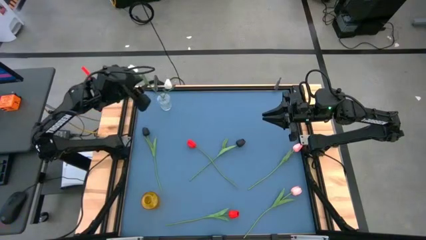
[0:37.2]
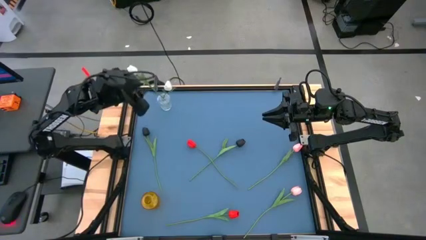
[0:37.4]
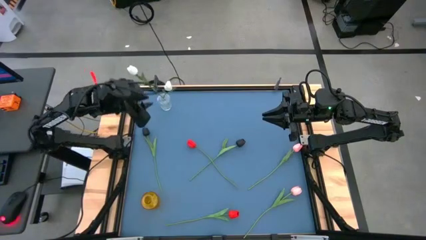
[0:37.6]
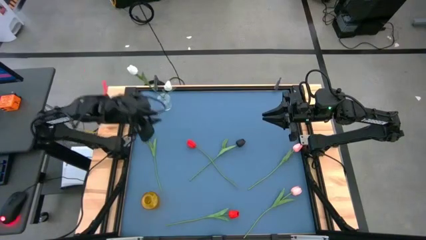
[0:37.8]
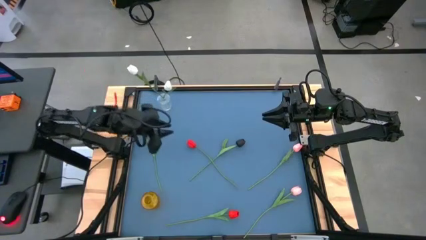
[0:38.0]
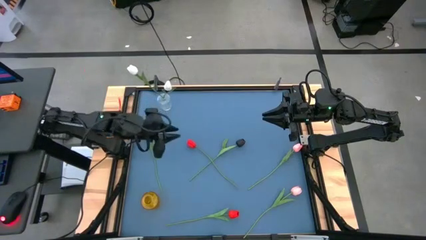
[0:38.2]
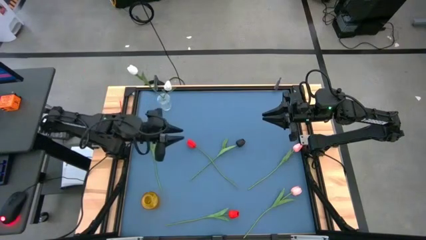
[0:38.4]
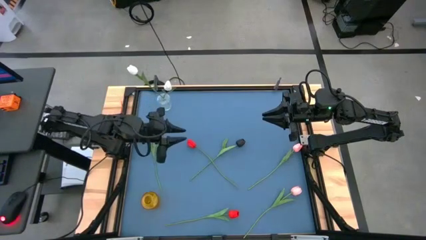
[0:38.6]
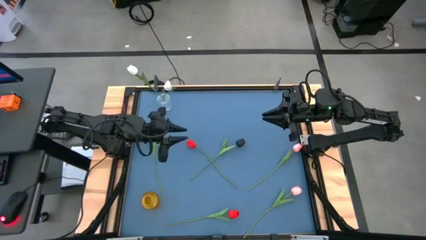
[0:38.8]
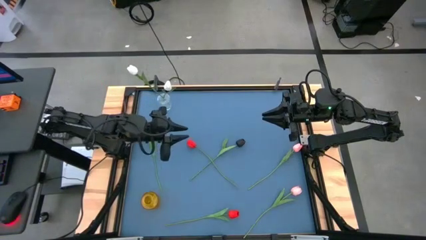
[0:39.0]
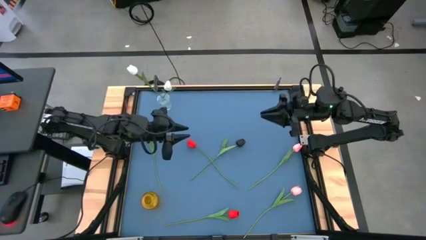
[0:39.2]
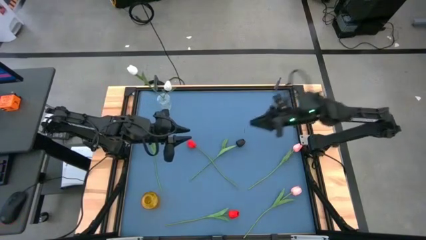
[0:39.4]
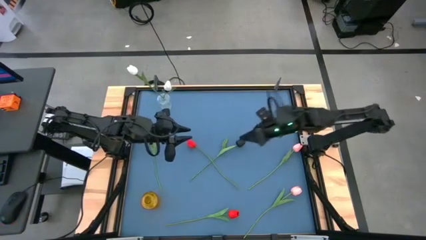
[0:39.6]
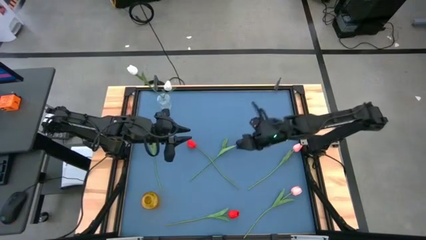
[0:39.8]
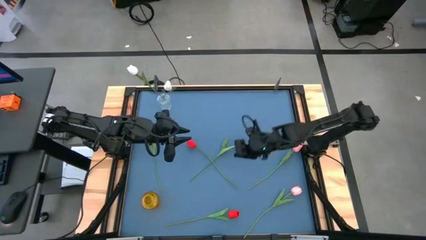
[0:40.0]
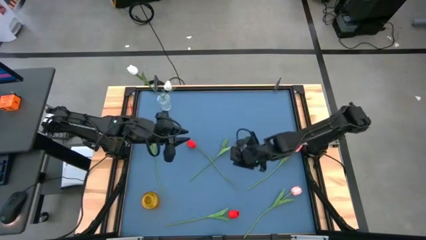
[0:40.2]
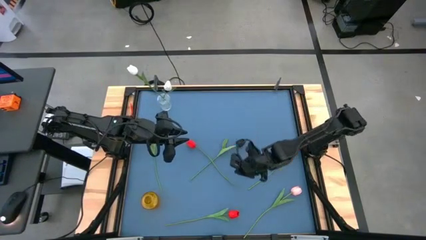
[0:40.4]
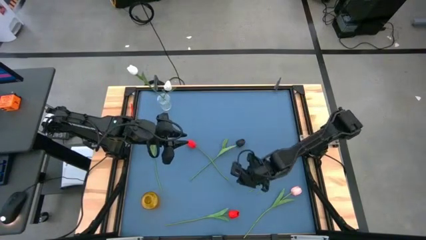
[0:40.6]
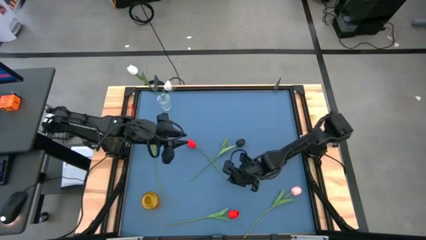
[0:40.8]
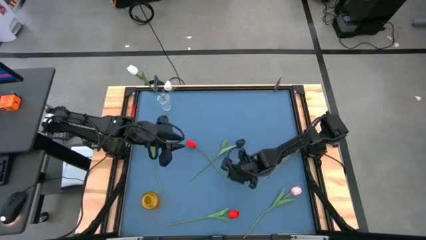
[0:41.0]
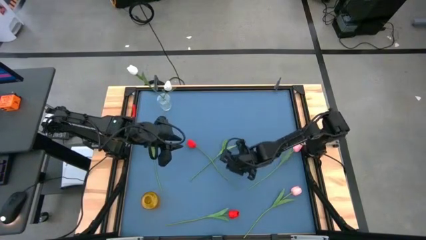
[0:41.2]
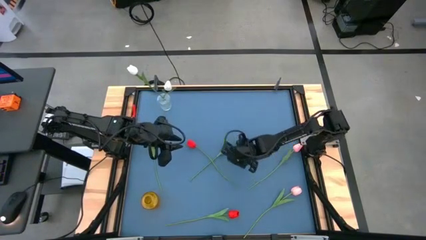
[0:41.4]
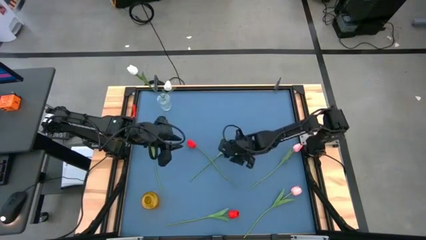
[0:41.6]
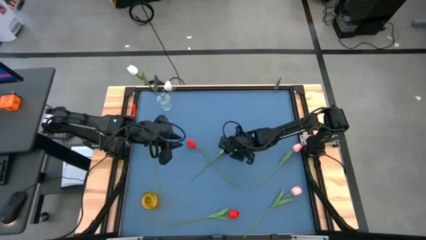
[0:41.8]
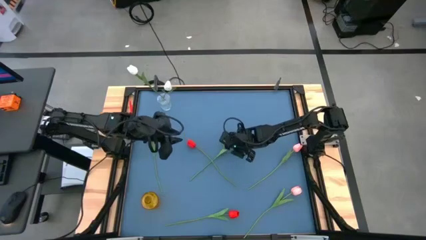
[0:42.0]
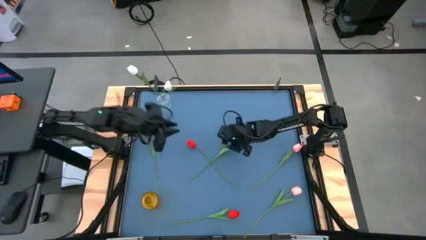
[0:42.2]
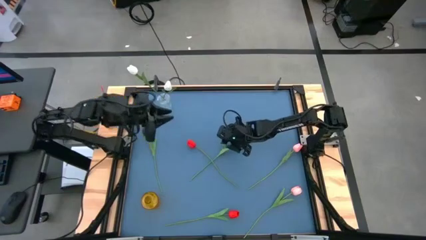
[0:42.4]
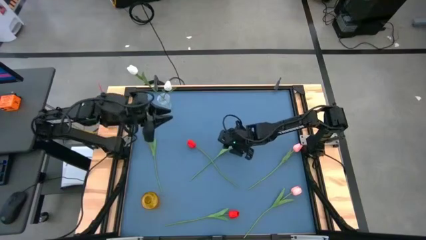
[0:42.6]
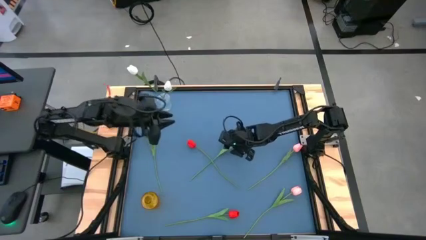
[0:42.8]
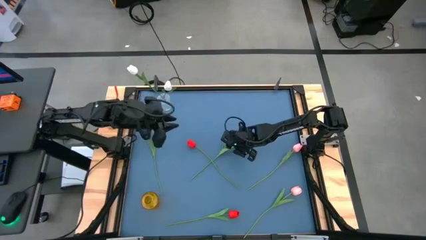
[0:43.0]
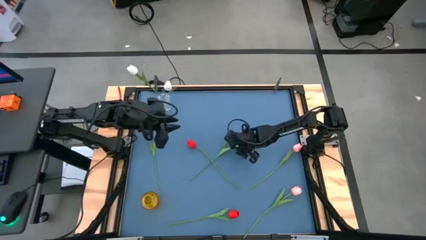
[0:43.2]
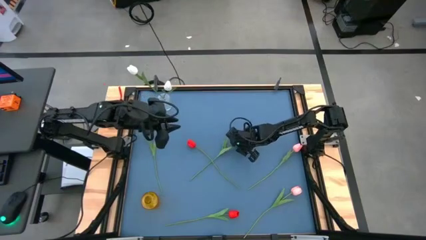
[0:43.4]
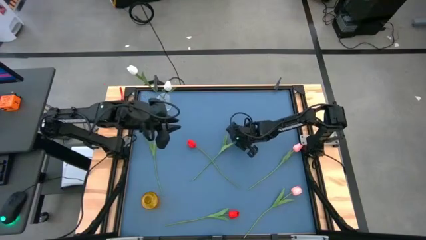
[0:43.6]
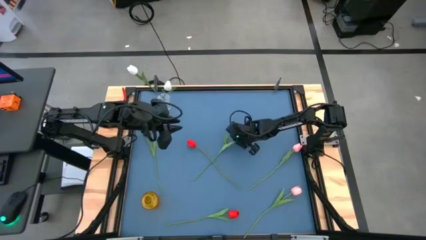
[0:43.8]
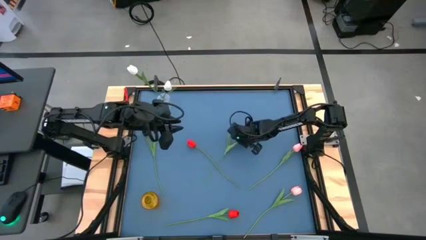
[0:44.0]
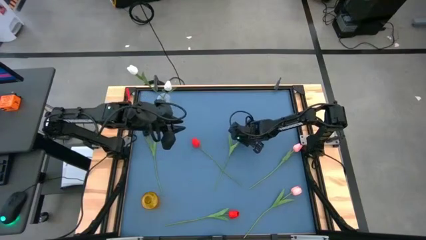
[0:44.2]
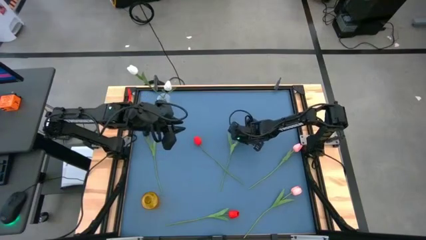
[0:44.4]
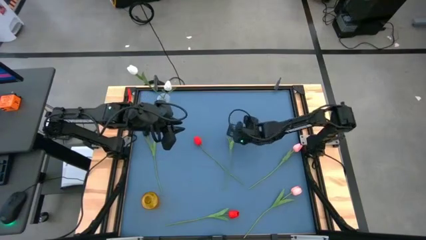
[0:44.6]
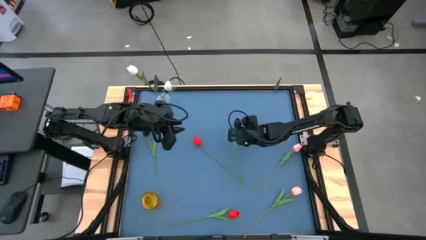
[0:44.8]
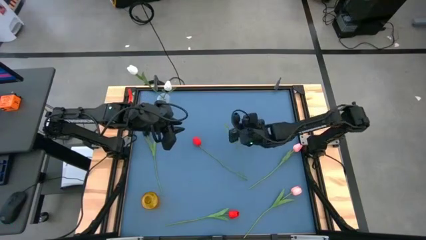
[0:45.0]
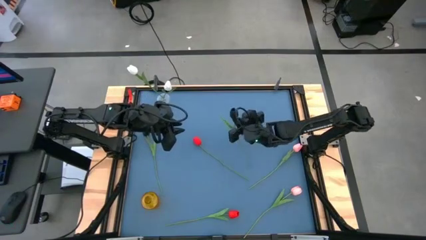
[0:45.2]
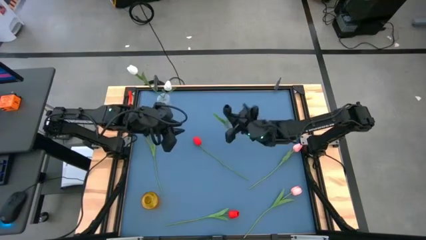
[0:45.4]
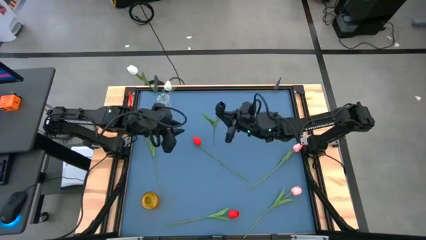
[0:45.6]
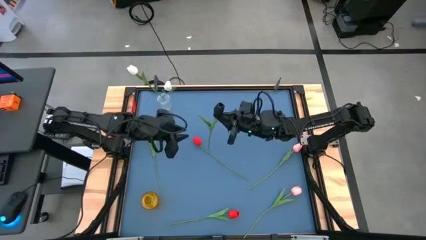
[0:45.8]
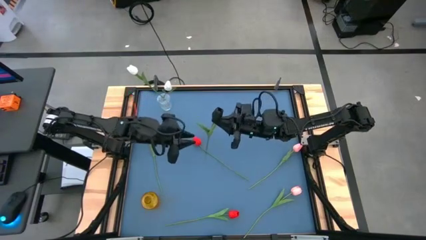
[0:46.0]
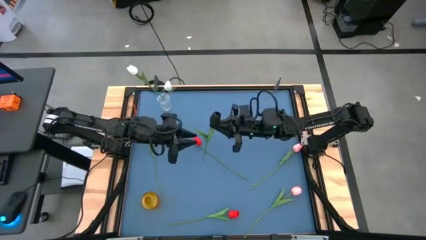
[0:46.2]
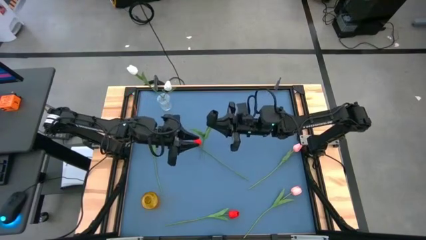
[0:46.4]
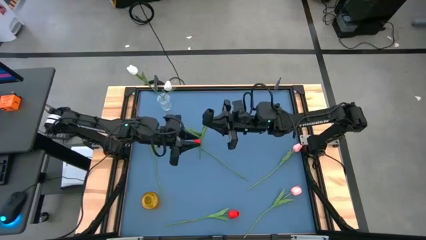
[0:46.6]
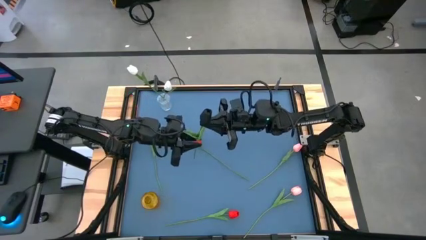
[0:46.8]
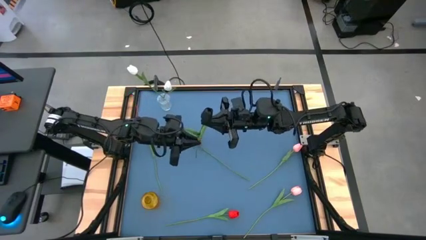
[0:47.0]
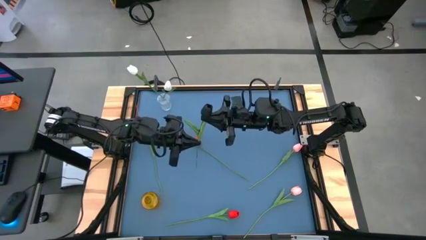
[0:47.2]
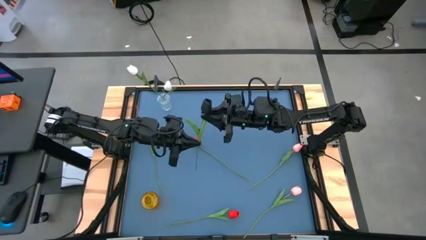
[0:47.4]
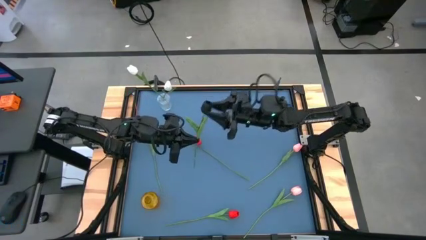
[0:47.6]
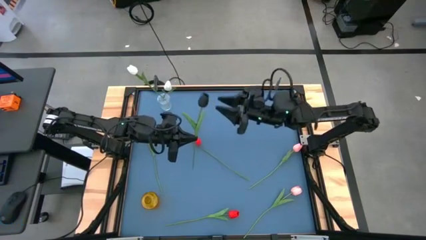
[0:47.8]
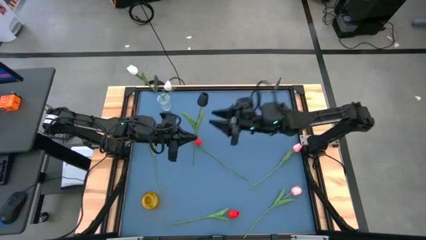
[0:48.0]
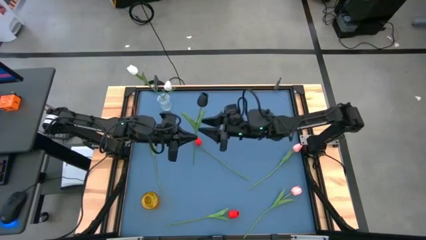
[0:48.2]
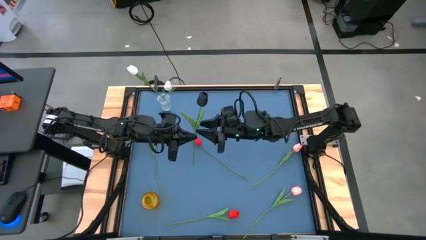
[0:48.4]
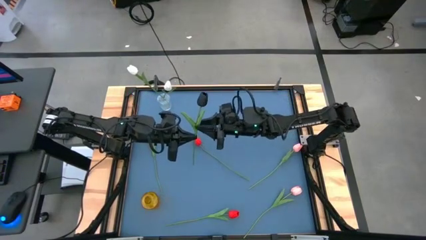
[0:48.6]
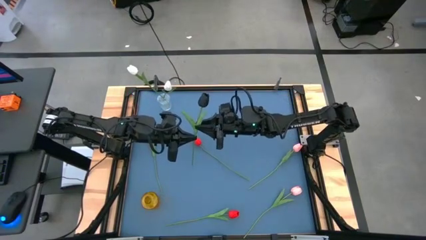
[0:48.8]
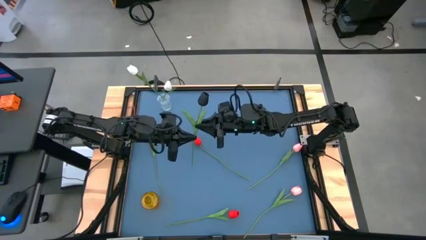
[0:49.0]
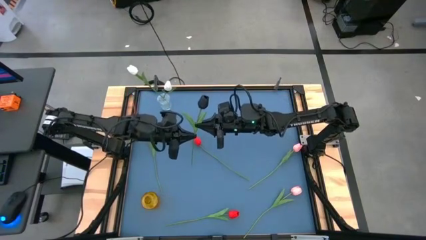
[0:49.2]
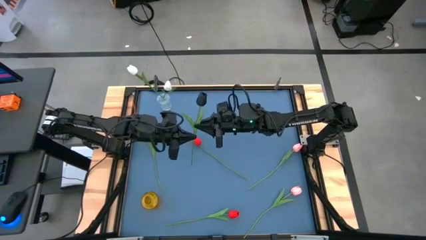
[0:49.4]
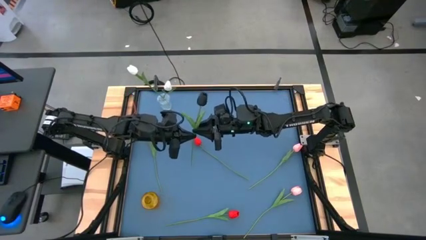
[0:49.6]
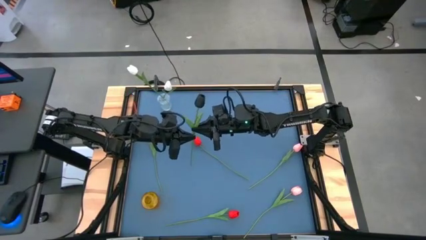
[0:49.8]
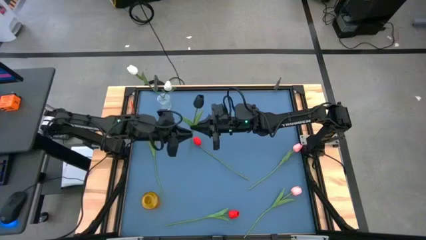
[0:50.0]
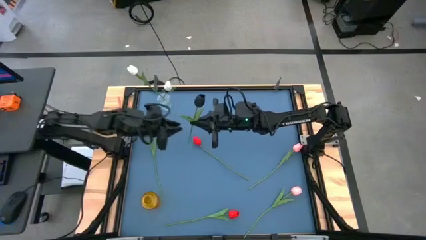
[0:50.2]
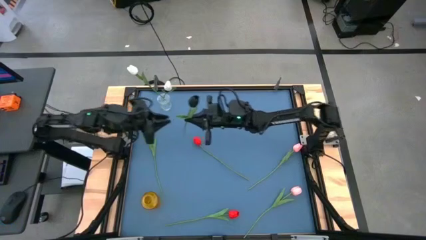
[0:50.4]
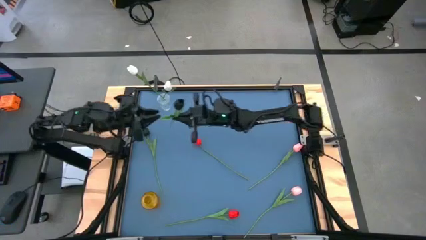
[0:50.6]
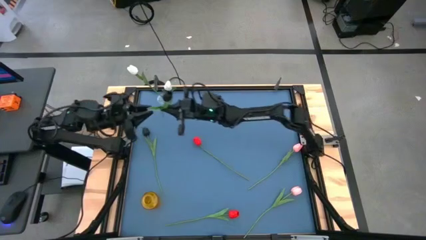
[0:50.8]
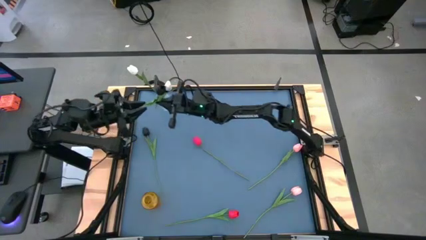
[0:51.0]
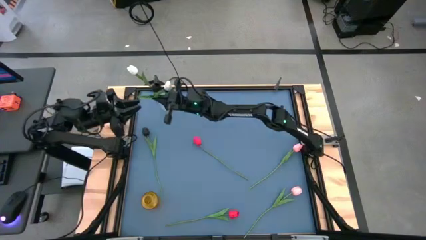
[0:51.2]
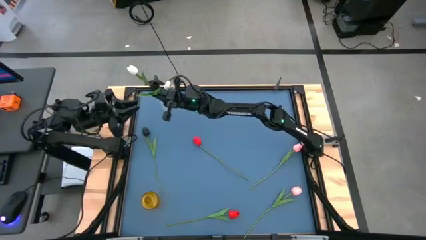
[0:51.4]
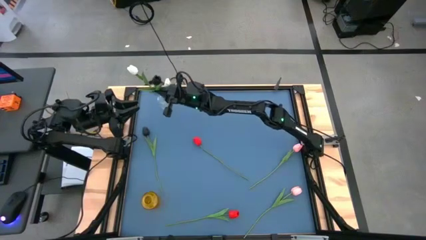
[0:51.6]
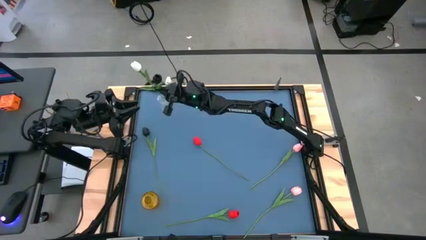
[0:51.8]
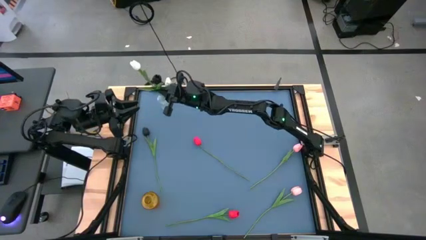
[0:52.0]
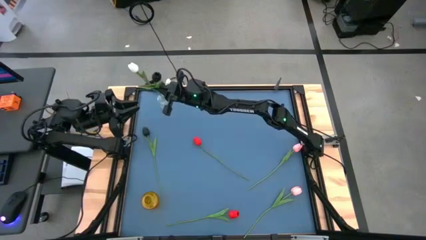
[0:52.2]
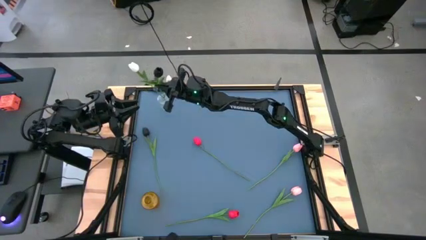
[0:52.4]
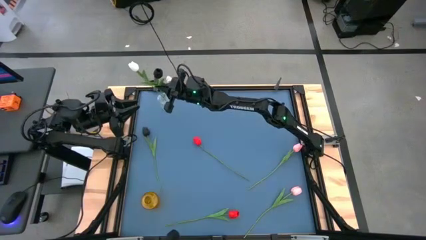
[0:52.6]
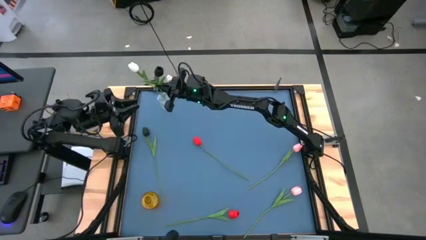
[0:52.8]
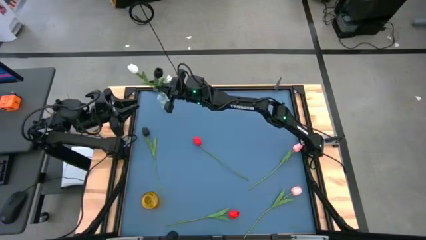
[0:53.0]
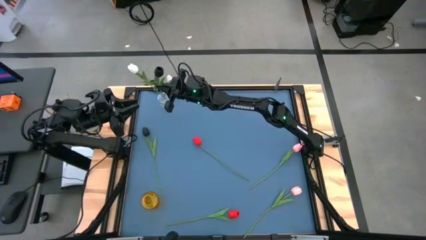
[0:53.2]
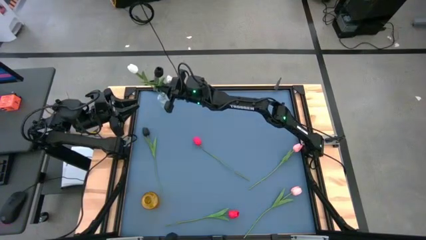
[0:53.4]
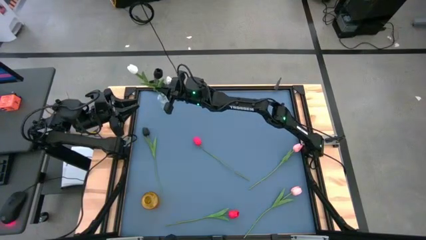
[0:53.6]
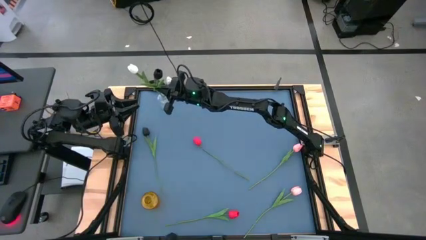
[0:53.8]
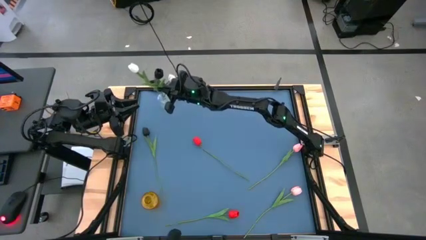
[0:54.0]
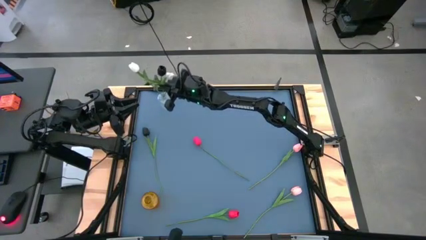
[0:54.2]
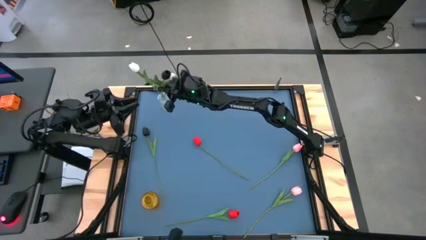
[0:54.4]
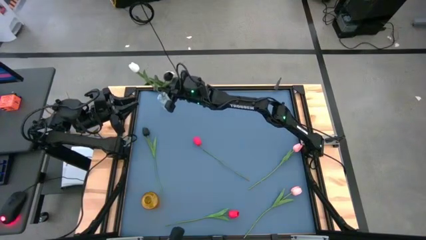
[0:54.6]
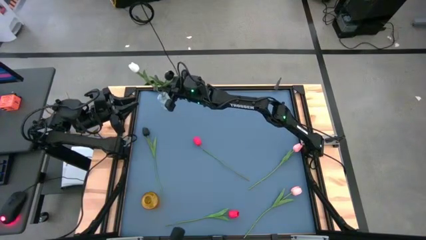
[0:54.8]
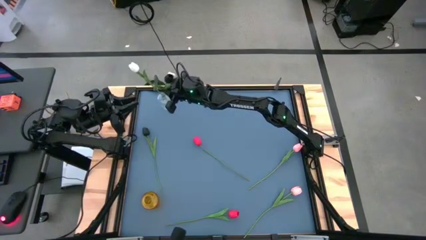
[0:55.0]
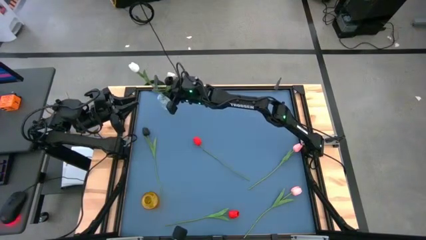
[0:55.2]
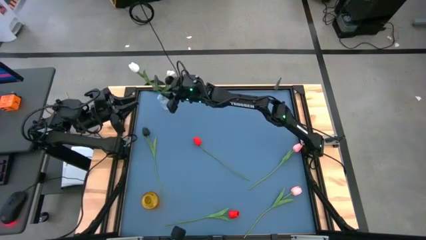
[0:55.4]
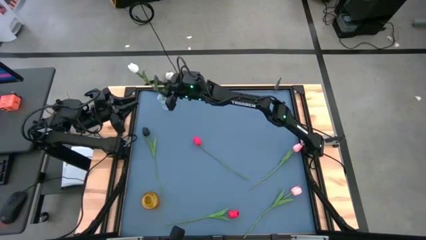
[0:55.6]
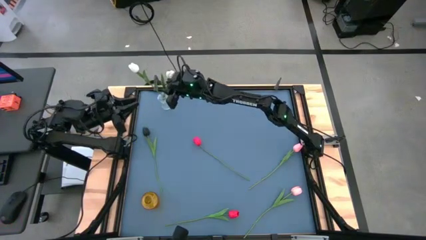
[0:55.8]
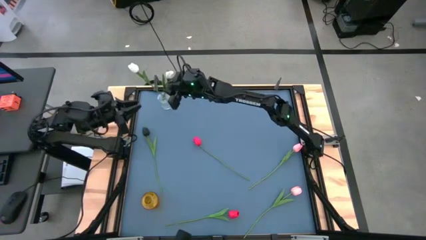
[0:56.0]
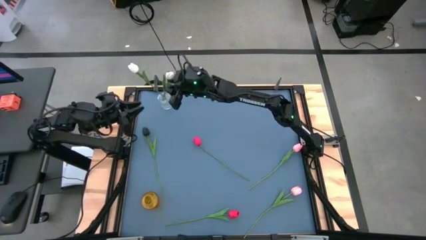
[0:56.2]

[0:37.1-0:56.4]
Task: Sort flowers into vase by color
Put the right black tulip into the transparent vase
